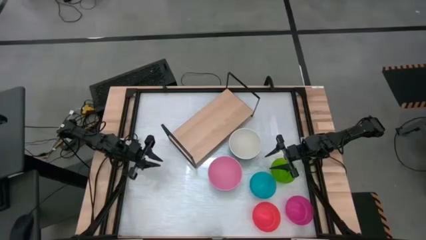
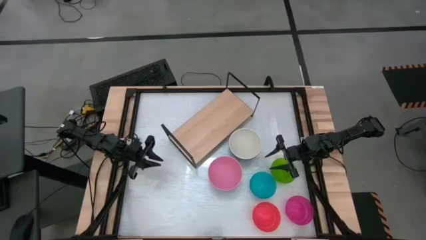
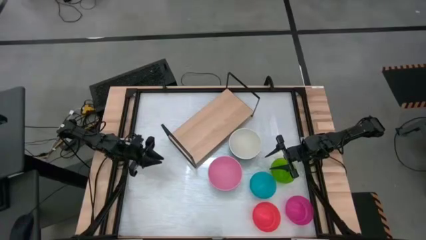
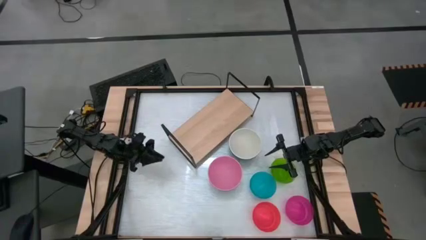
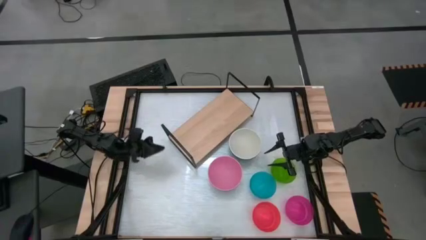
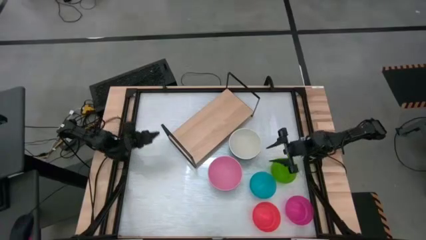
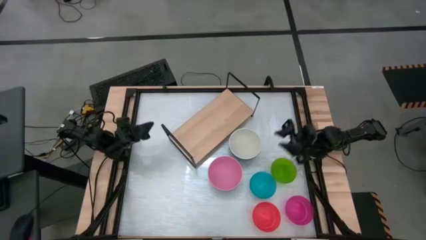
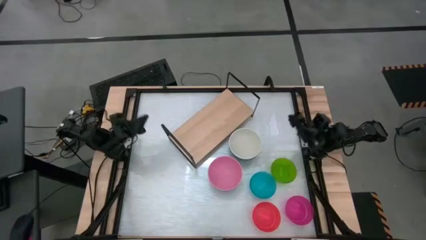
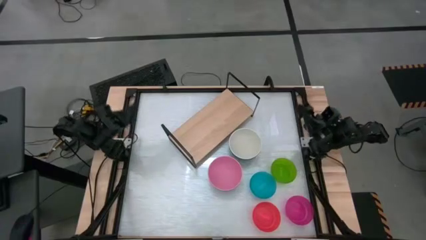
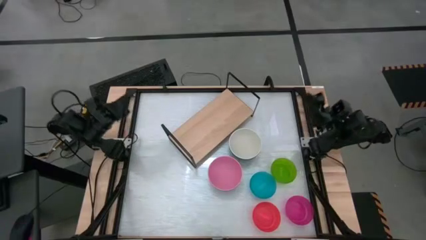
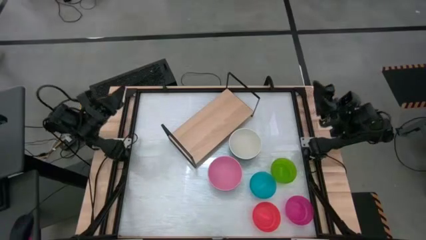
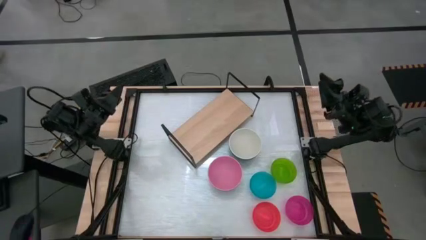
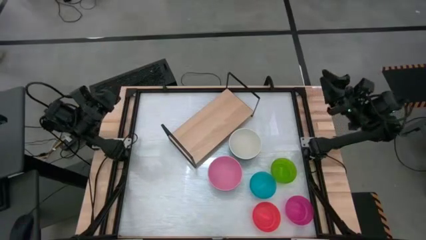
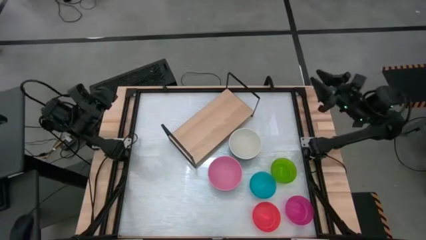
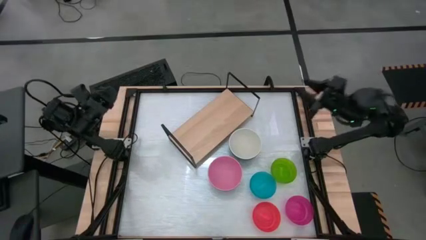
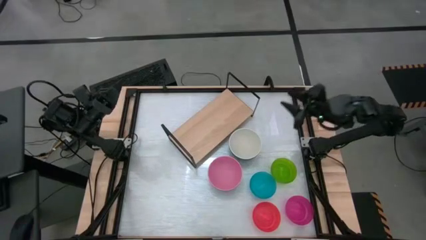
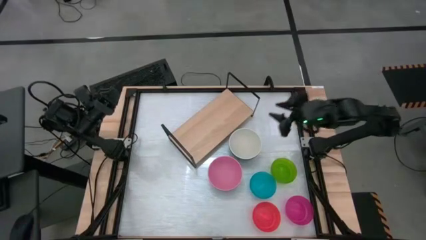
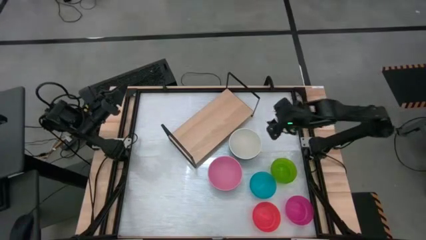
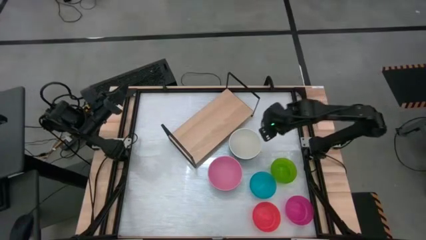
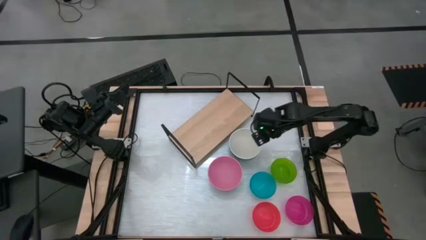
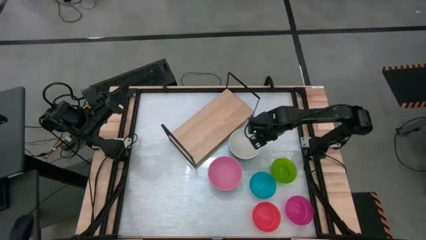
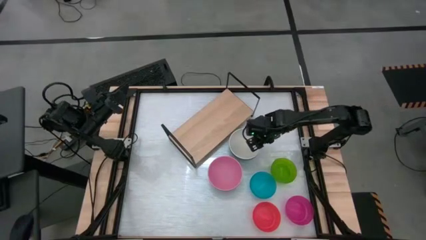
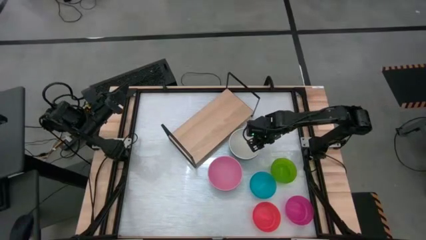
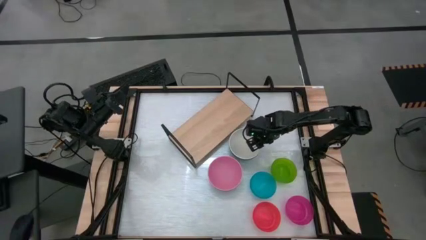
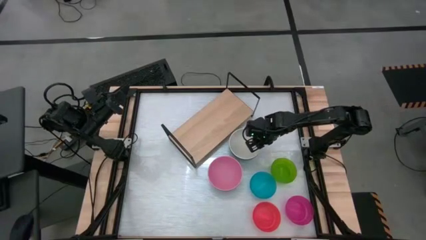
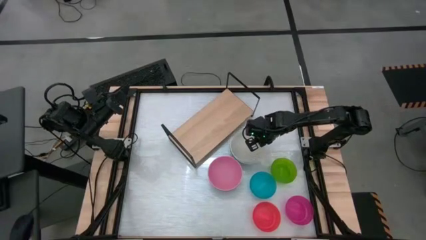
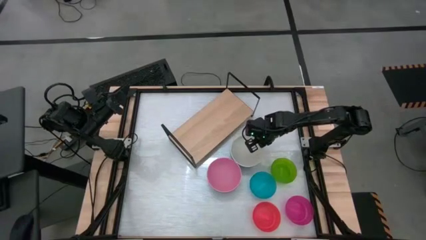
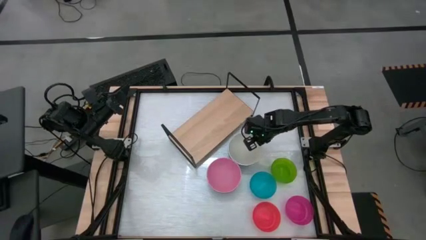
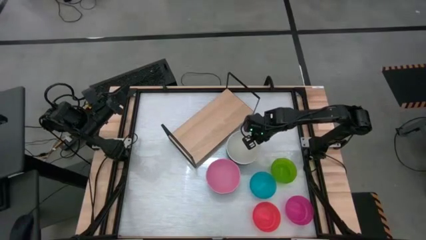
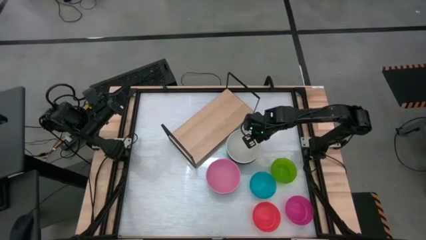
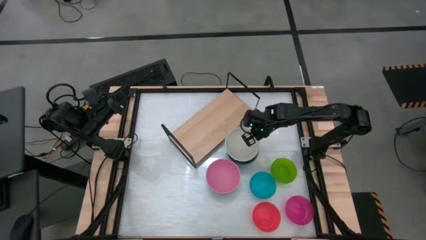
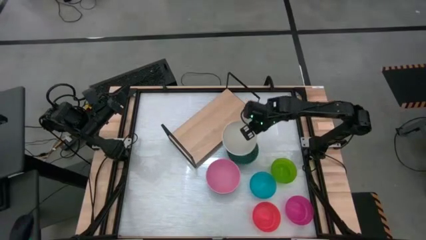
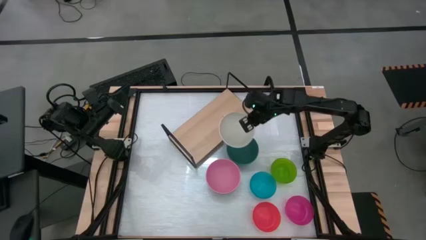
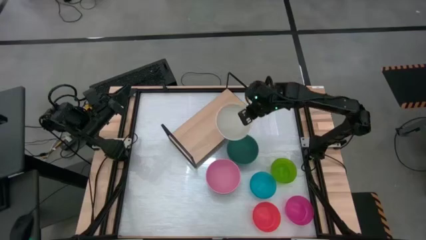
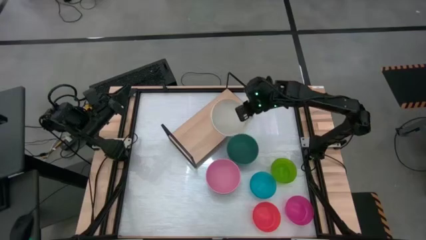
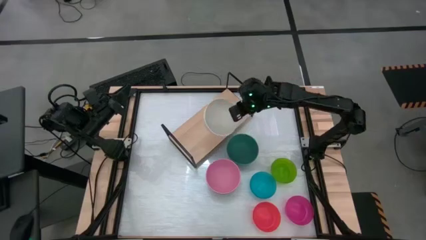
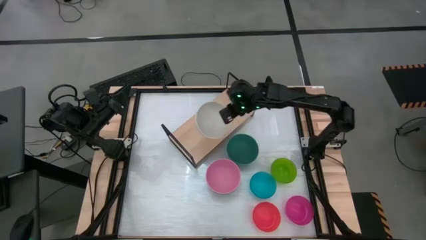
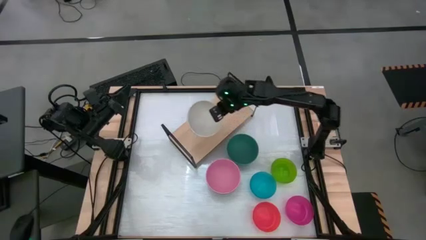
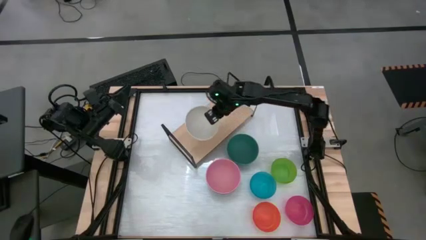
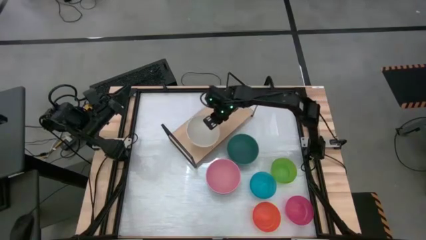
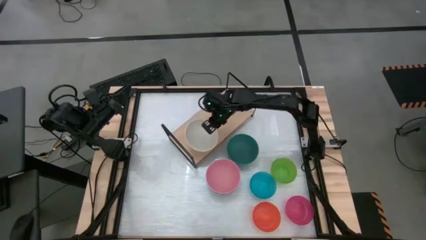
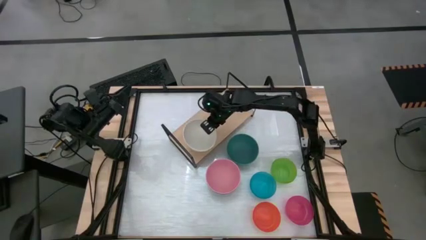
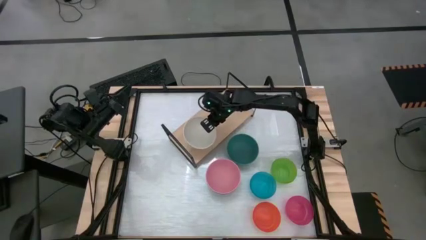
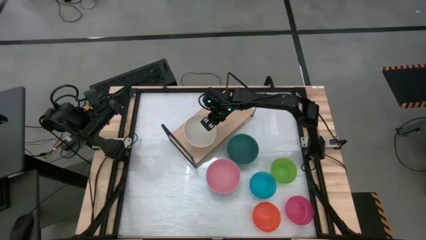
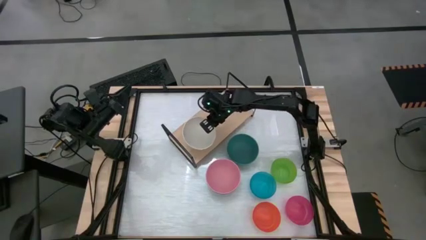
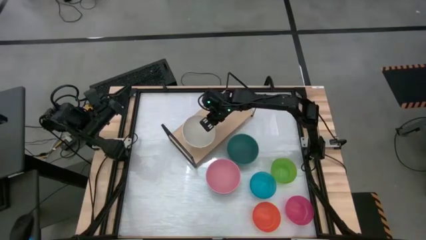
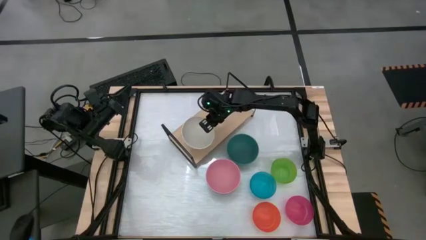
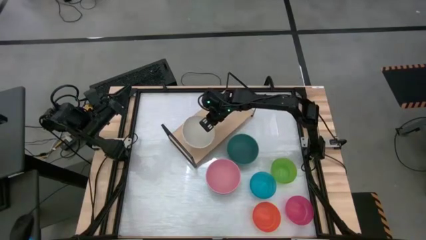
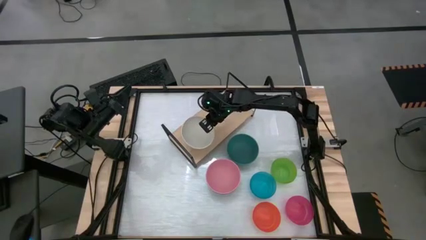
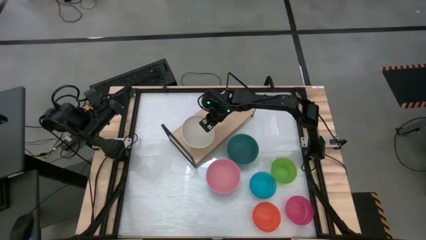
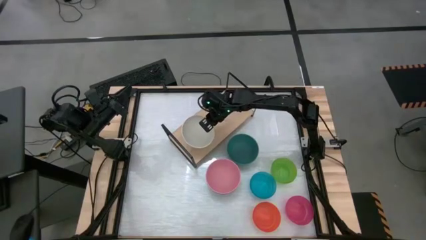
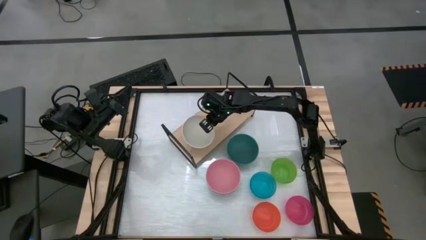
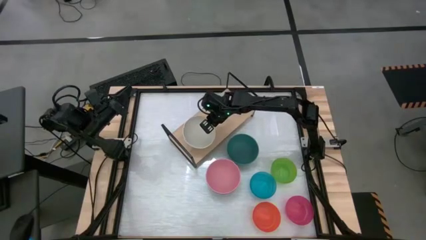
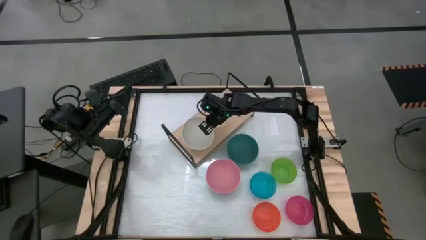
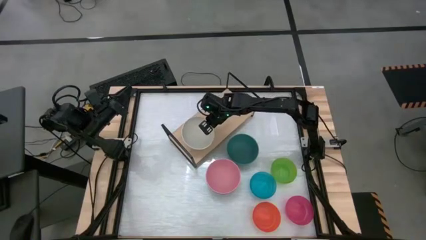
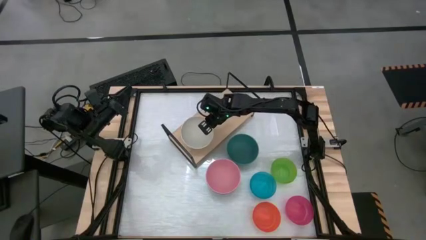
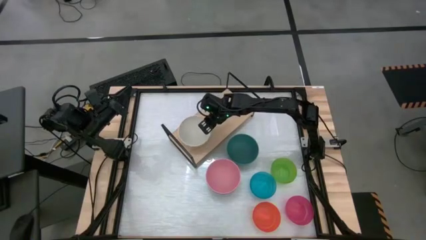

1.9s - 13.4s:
Task: Place and stack bowls onto a shelf
Put the white bowl on the shelf
